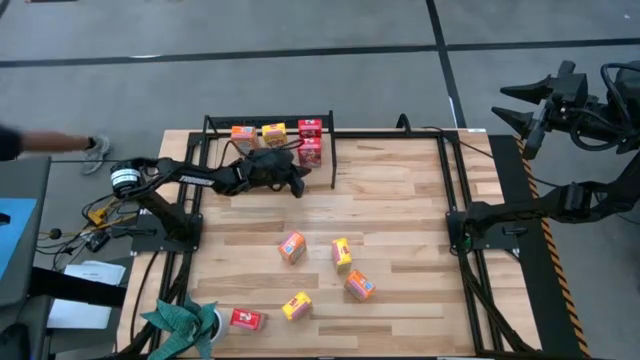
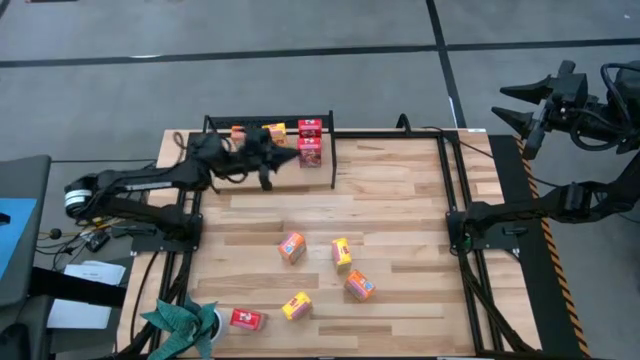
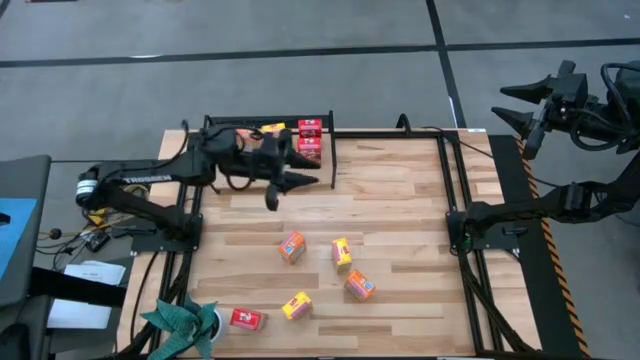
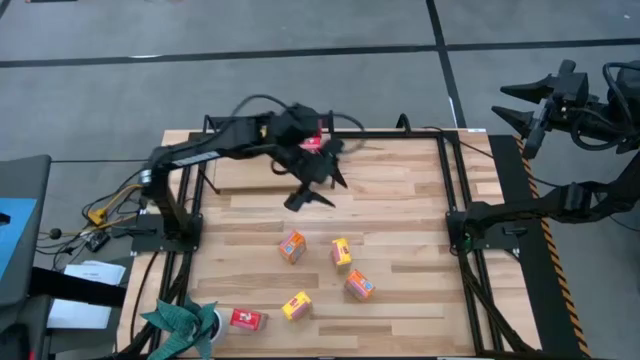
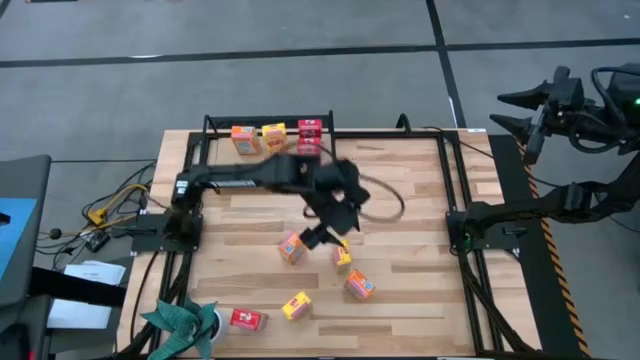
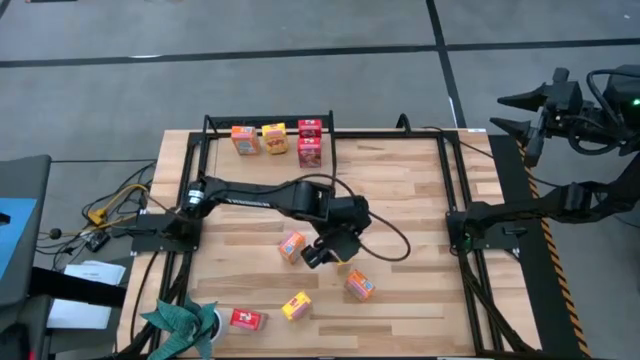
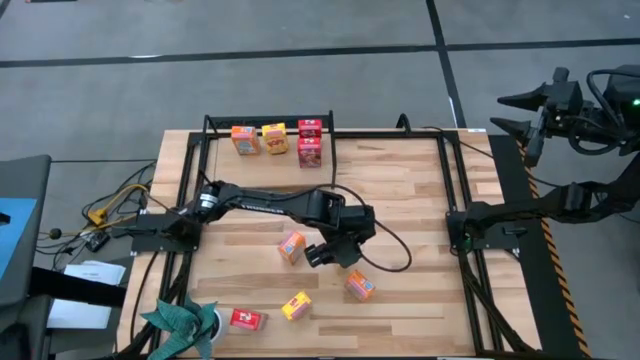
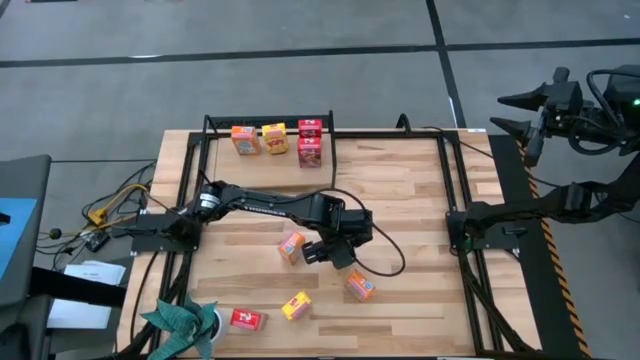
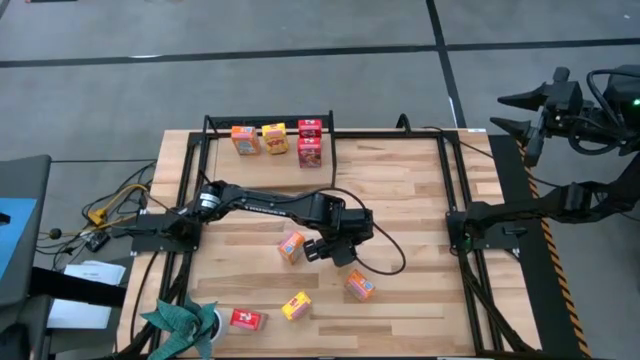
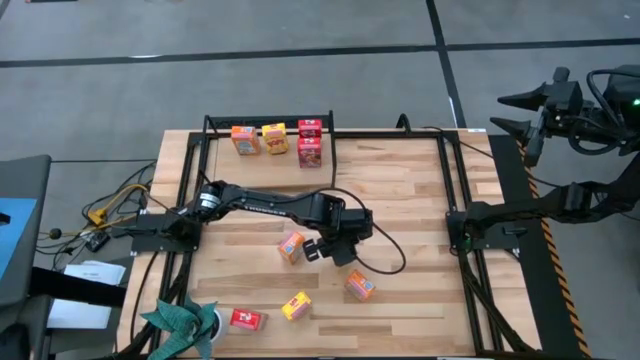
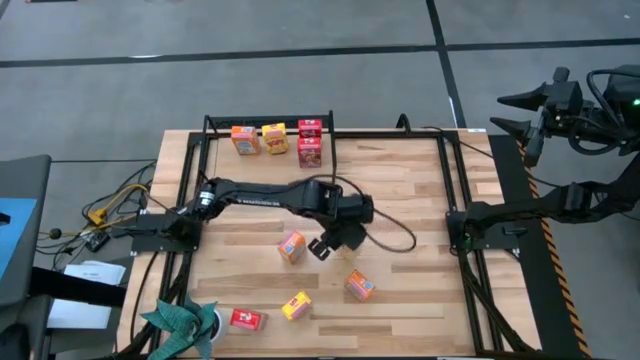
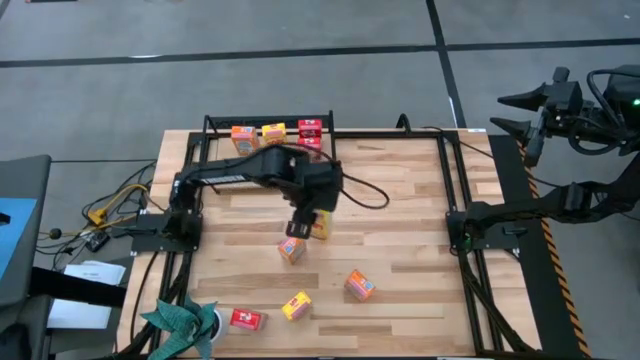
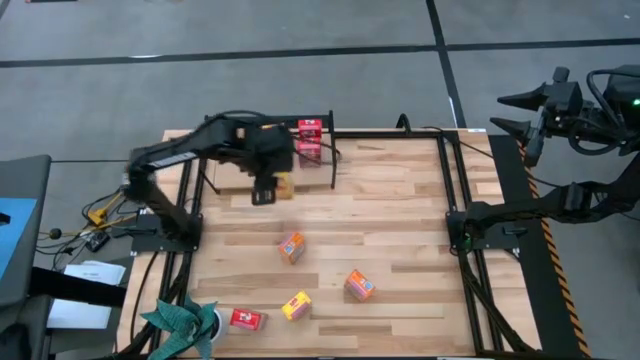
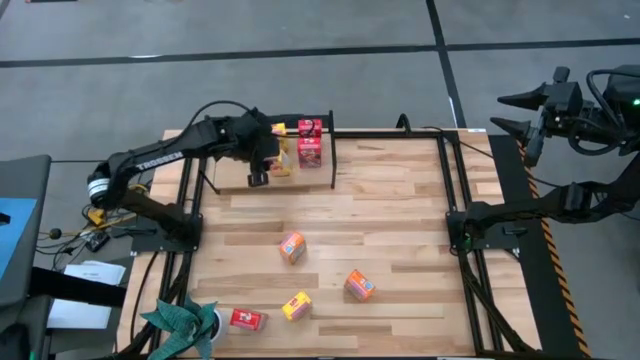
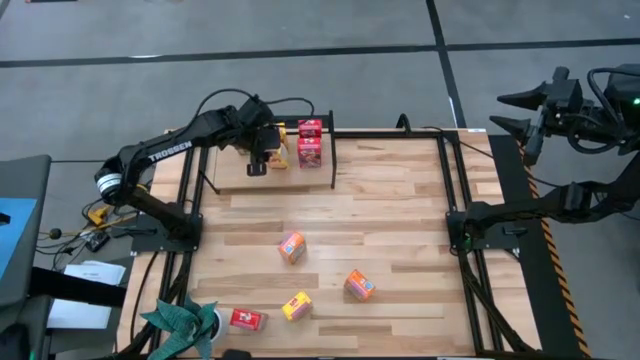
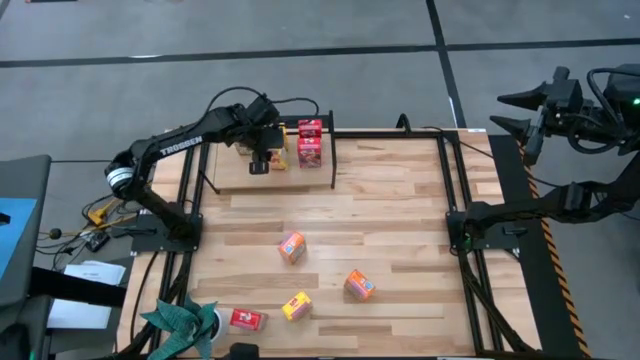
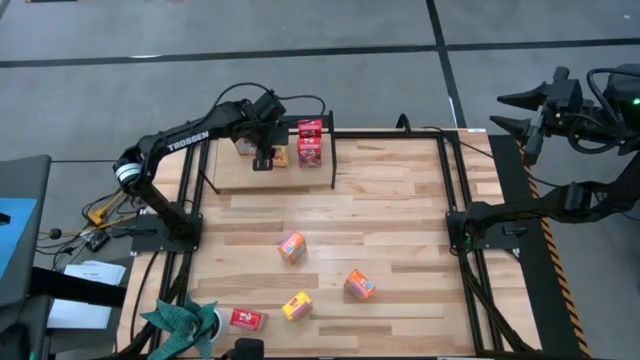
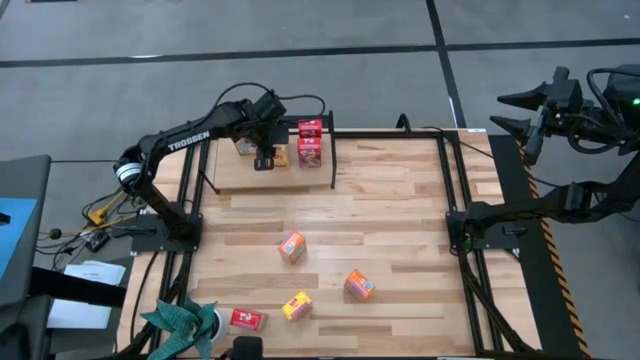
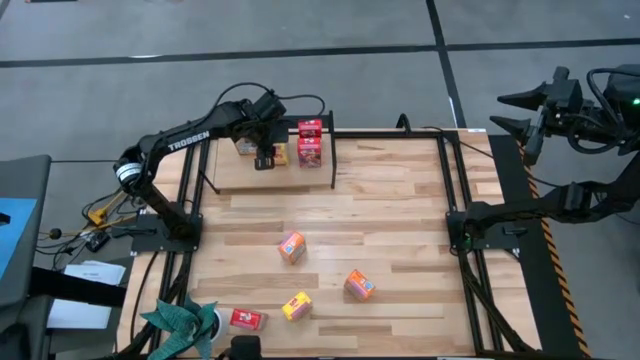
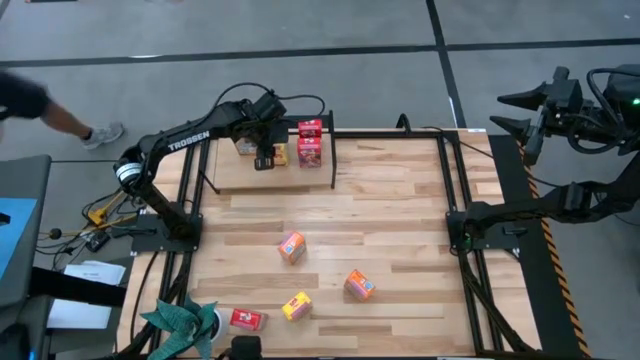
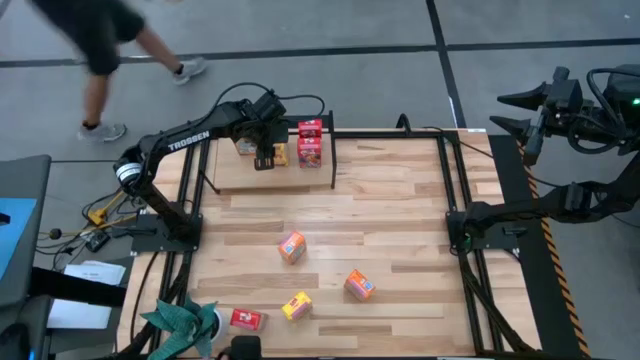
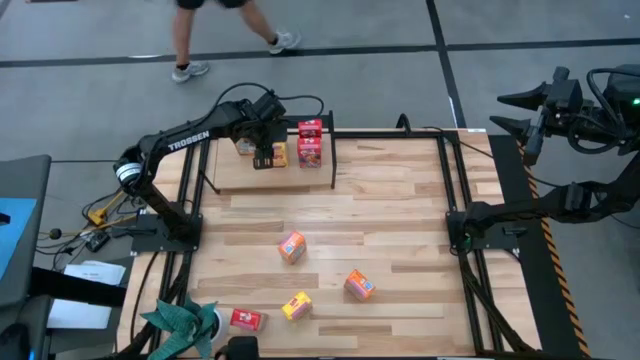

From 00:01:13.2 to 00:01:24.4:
Task: Stack cereal on shelf
Put the top yellow cereal box on the shelf aligned with the other yellow cereal box

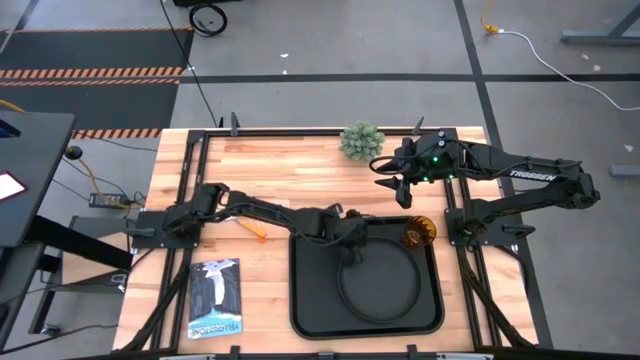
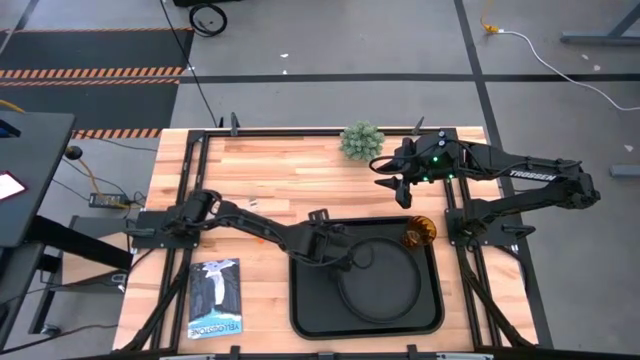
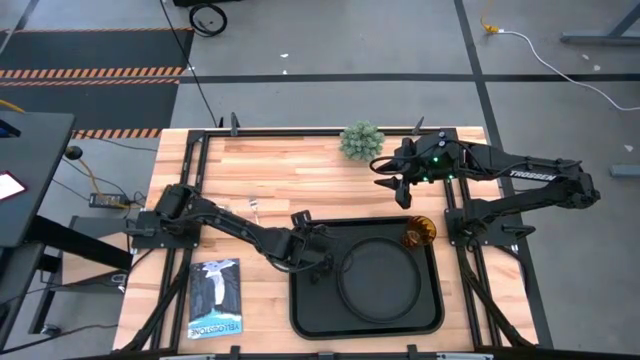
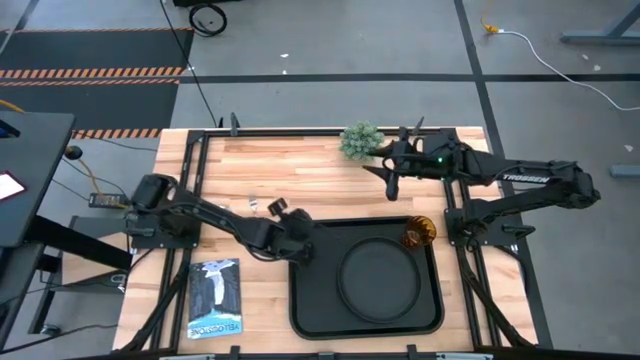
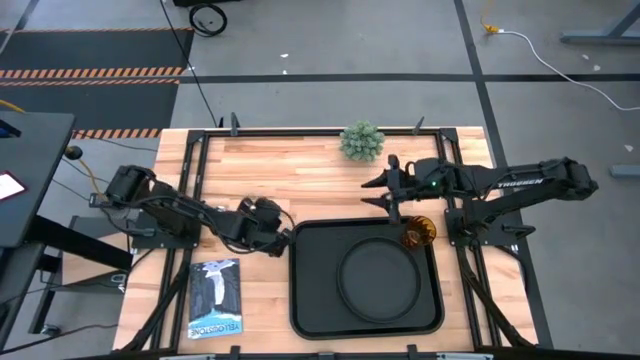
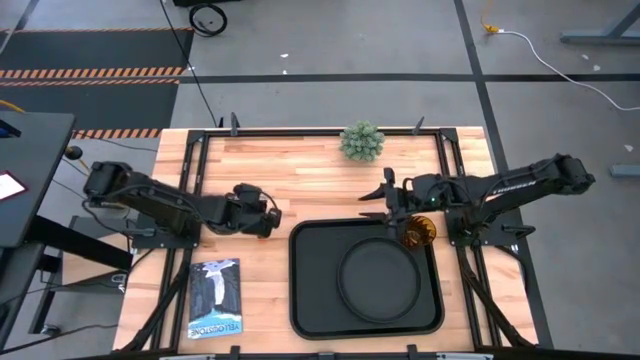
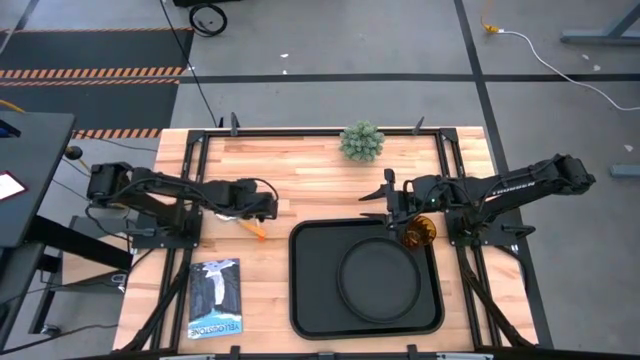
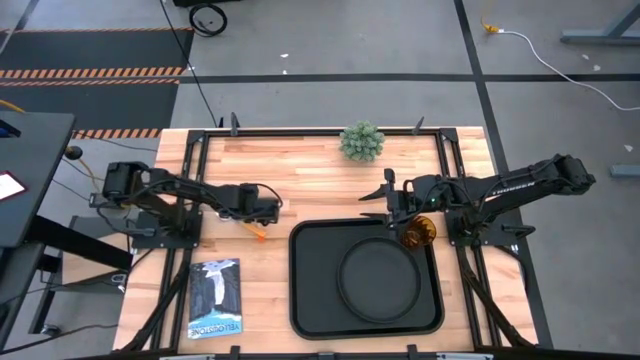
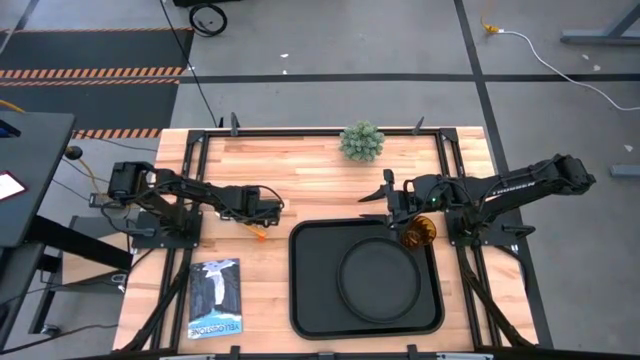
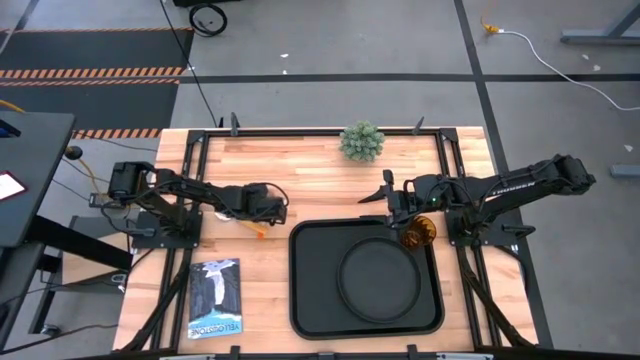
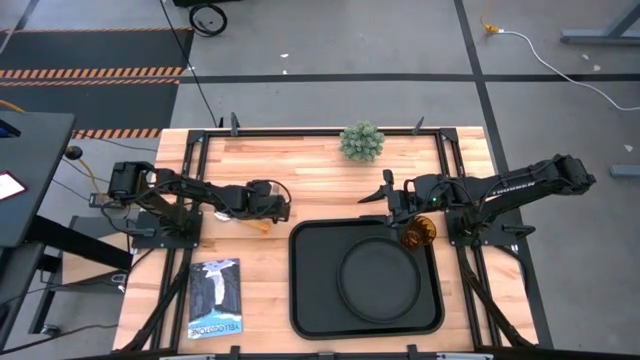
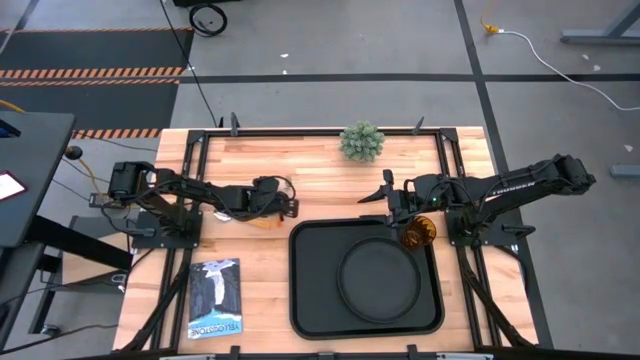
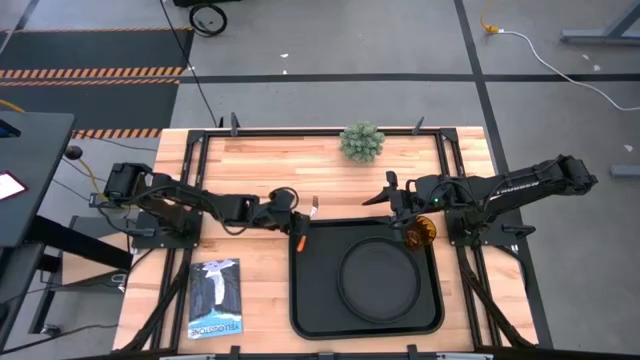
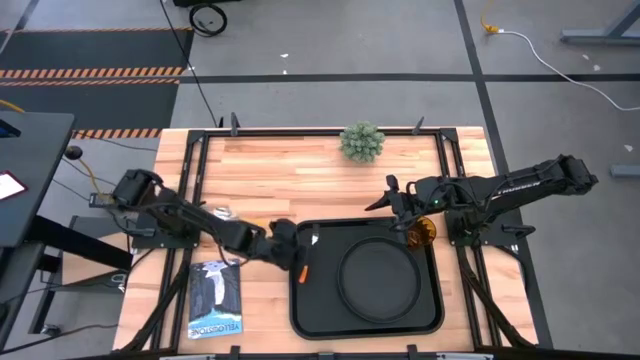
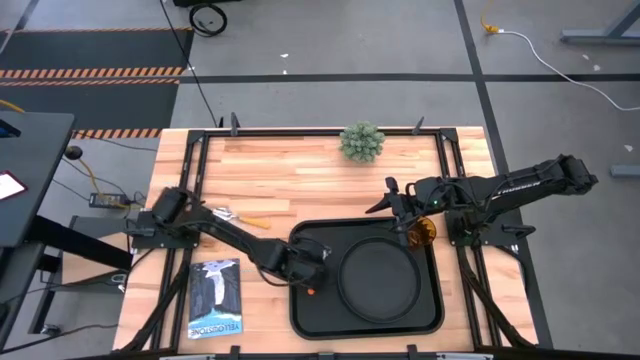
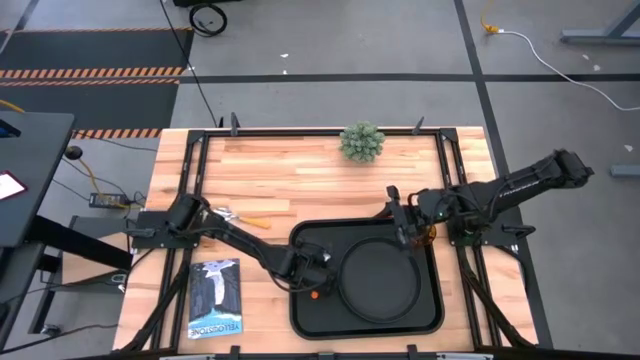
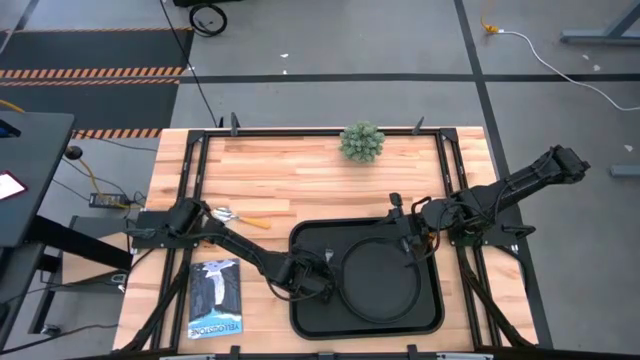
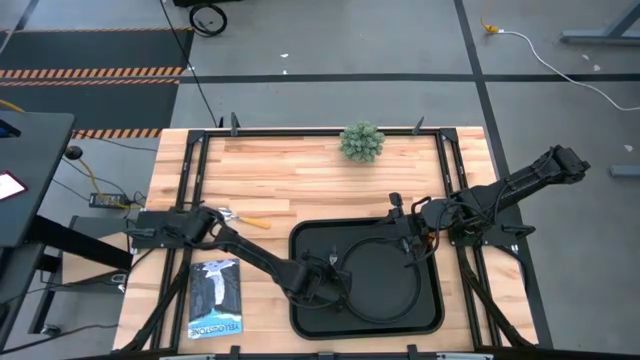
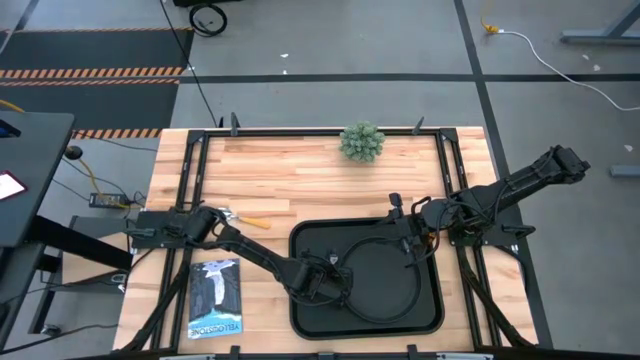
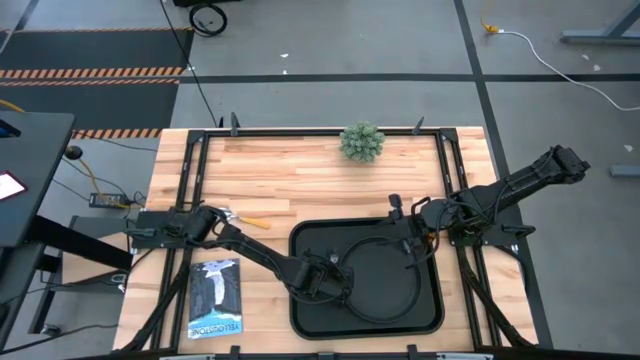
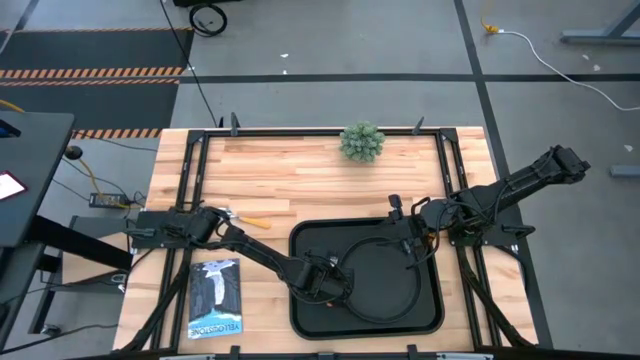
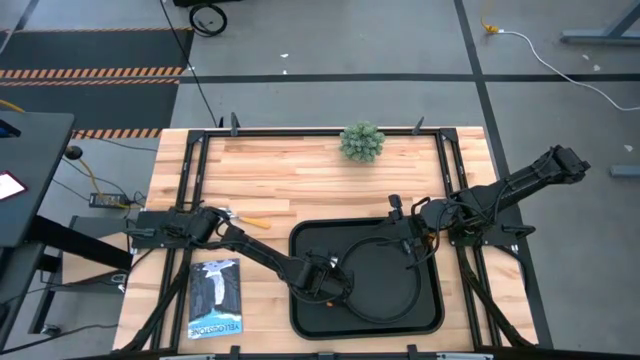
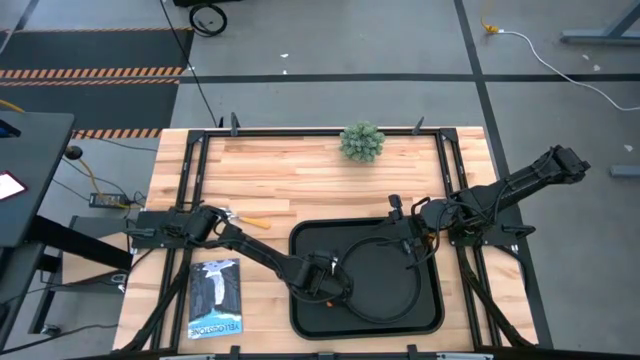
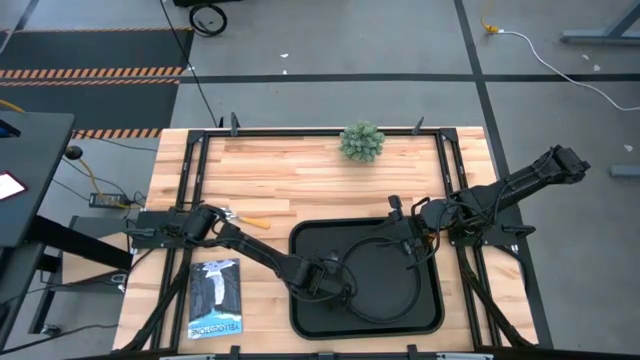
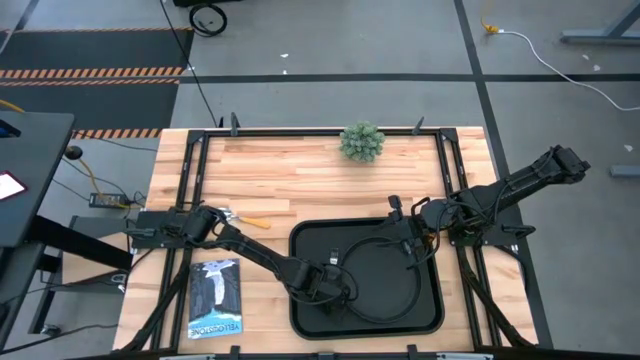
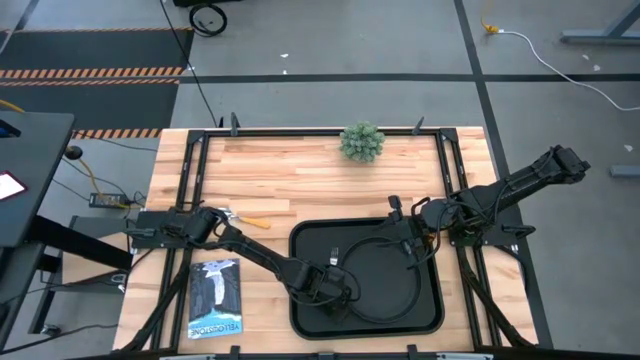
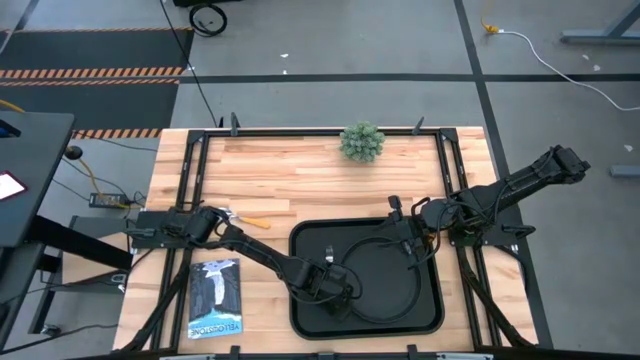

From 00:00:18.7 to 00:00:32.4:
Task: Pick and place plate/cup/fork/spoon on tray
Put the orange fork on the black tray to the left of the black plate
